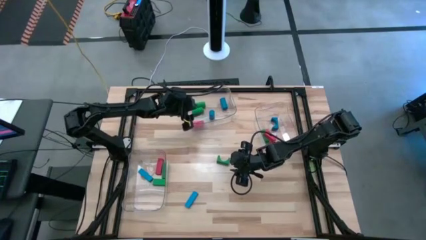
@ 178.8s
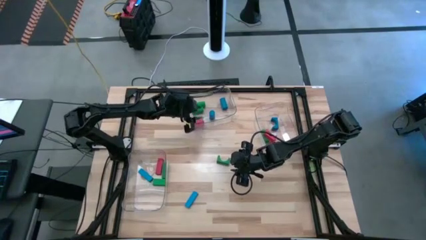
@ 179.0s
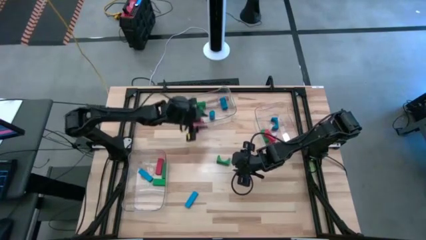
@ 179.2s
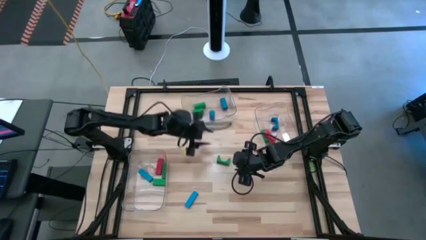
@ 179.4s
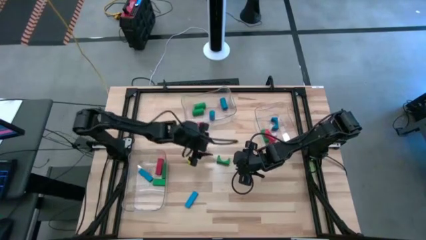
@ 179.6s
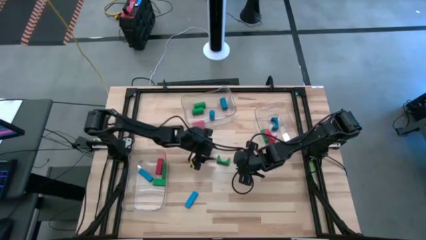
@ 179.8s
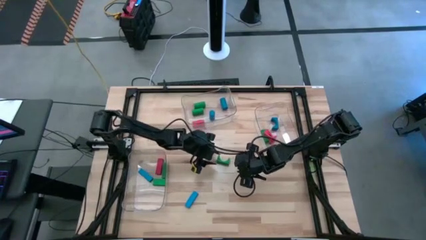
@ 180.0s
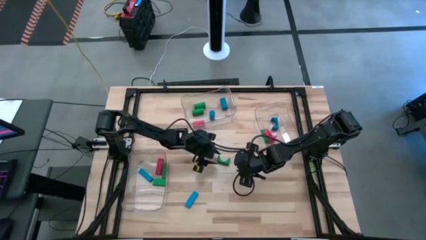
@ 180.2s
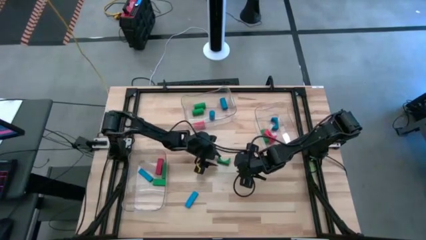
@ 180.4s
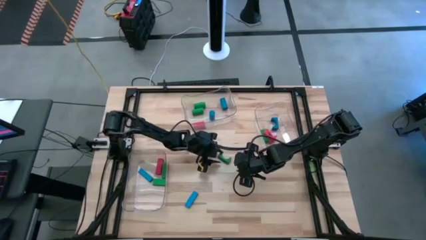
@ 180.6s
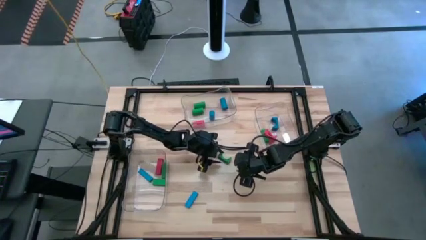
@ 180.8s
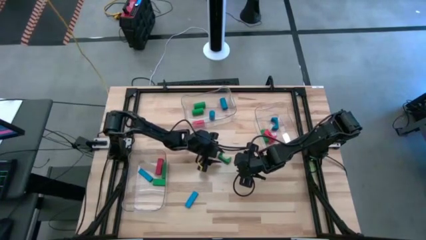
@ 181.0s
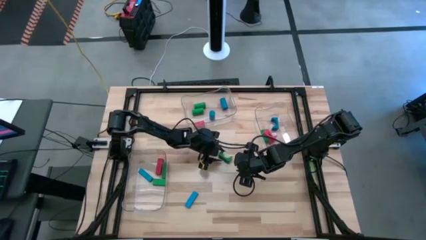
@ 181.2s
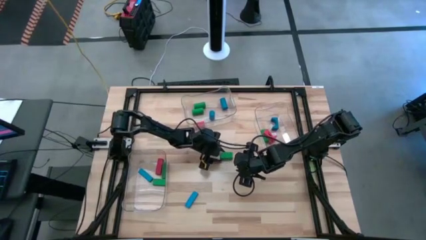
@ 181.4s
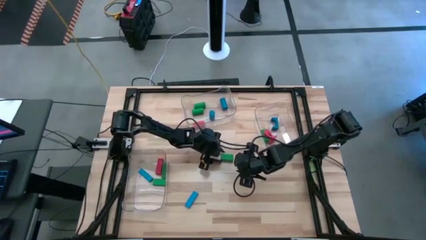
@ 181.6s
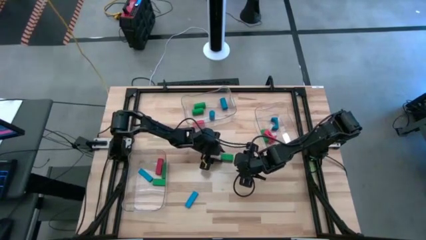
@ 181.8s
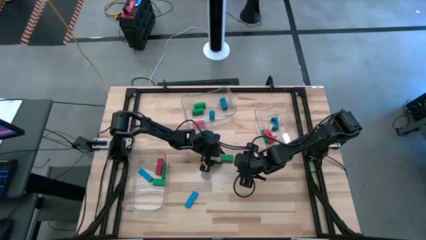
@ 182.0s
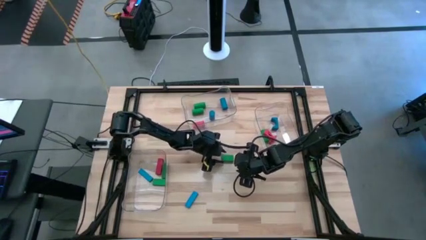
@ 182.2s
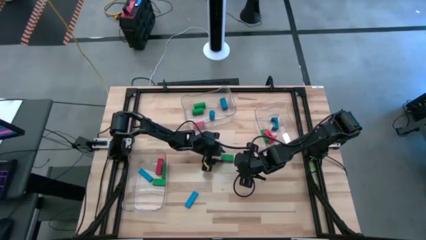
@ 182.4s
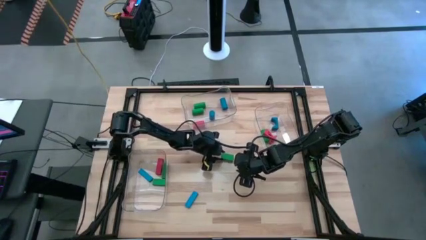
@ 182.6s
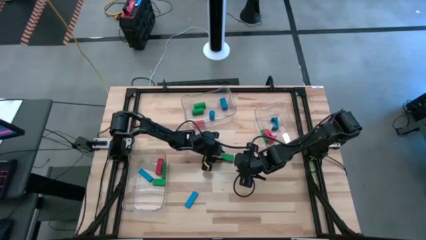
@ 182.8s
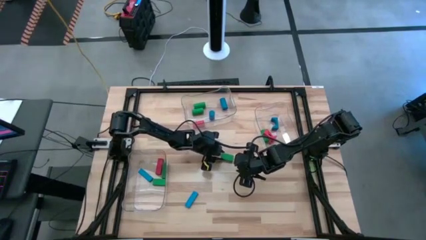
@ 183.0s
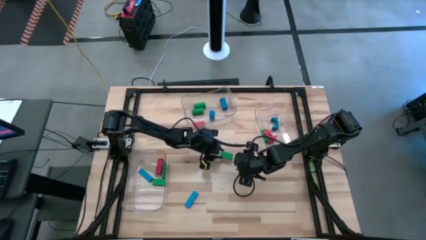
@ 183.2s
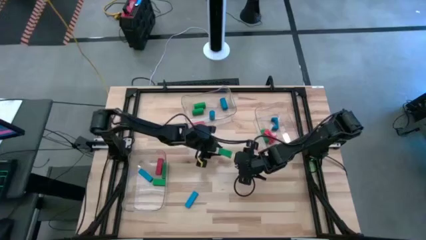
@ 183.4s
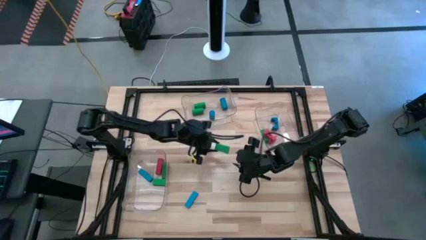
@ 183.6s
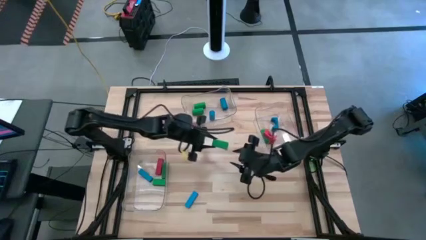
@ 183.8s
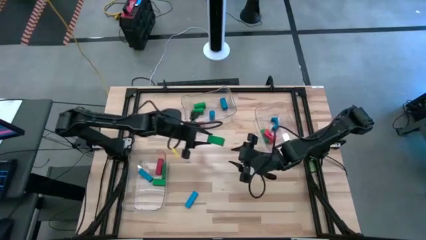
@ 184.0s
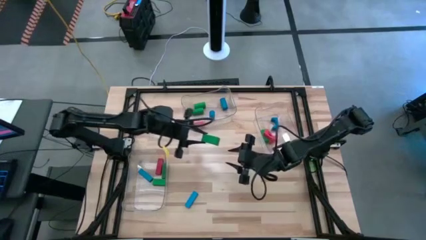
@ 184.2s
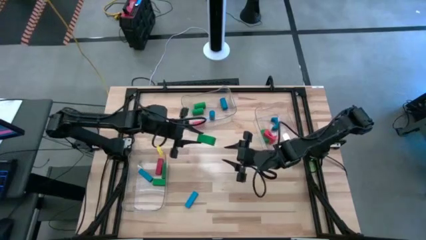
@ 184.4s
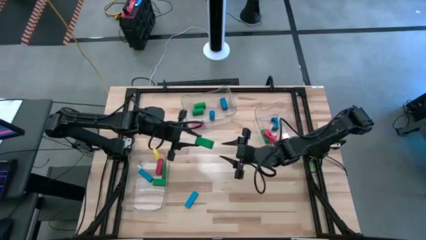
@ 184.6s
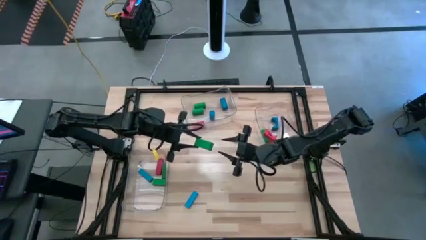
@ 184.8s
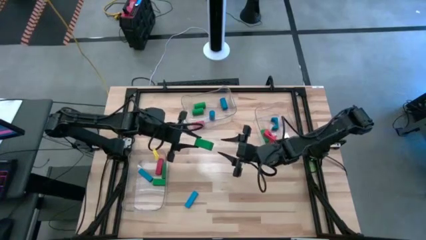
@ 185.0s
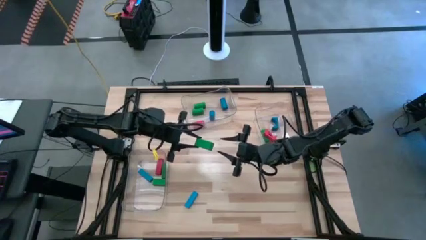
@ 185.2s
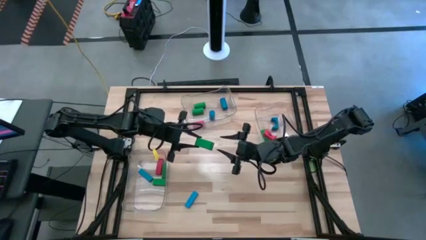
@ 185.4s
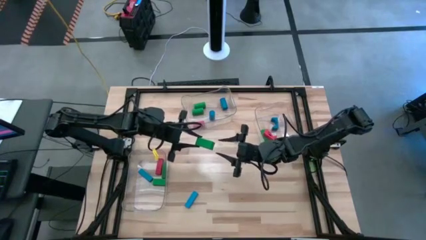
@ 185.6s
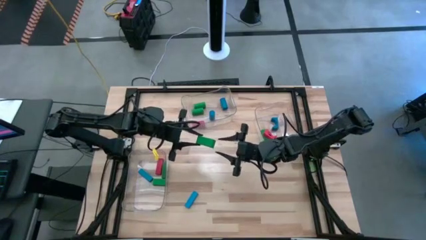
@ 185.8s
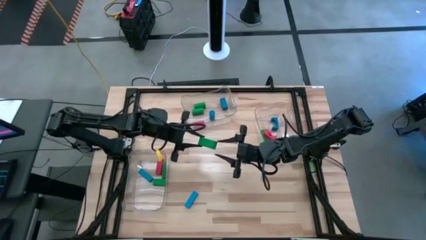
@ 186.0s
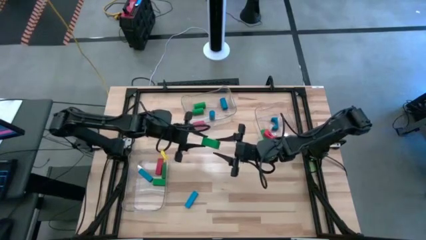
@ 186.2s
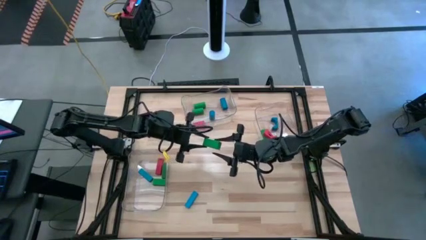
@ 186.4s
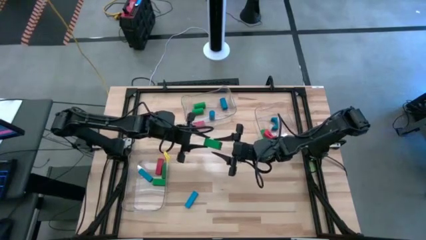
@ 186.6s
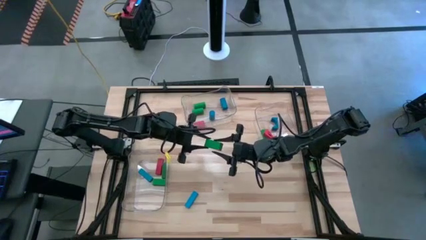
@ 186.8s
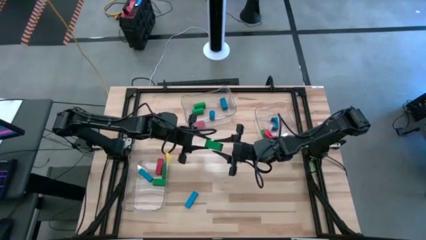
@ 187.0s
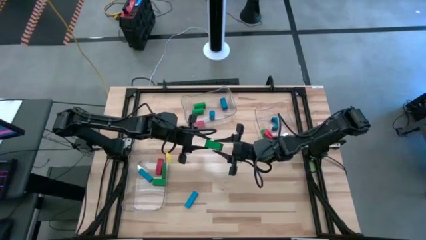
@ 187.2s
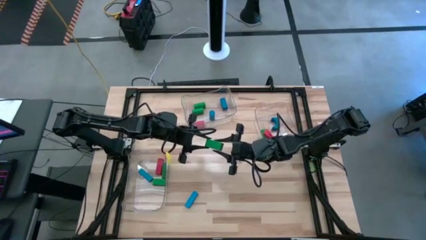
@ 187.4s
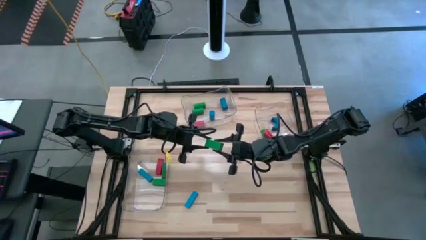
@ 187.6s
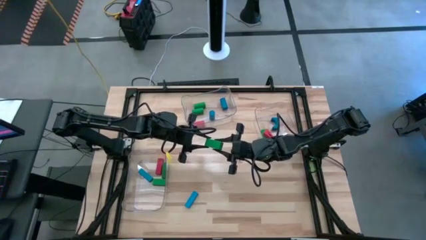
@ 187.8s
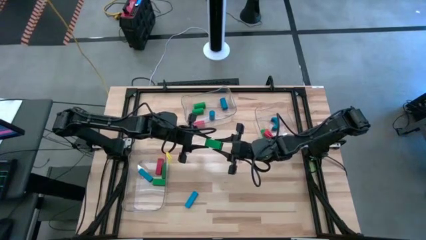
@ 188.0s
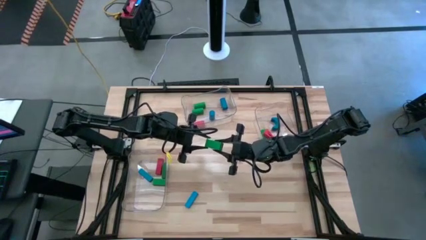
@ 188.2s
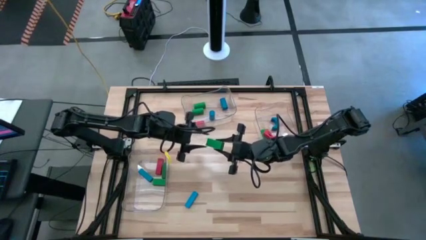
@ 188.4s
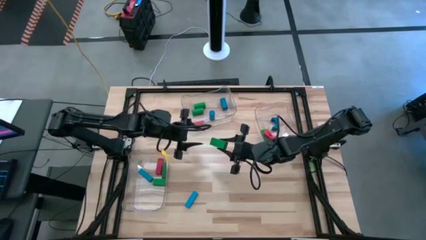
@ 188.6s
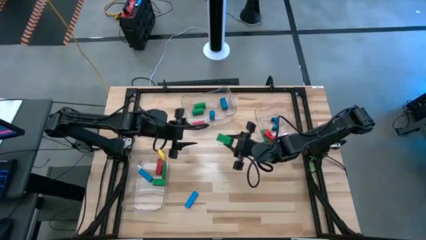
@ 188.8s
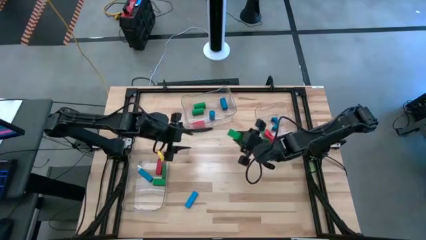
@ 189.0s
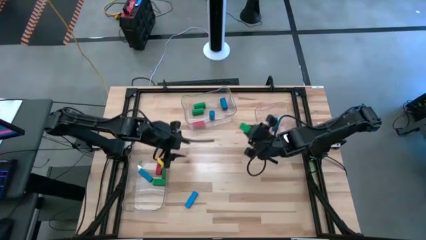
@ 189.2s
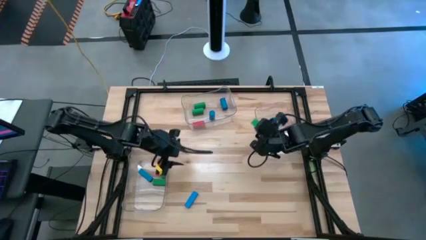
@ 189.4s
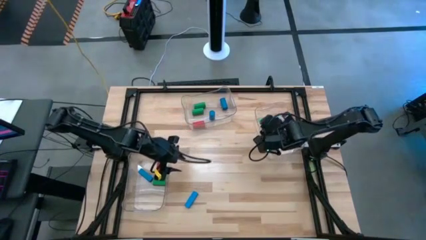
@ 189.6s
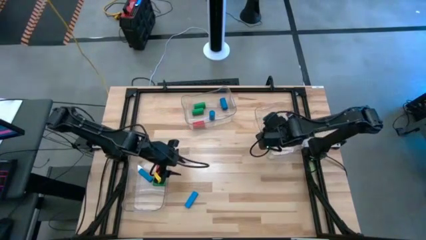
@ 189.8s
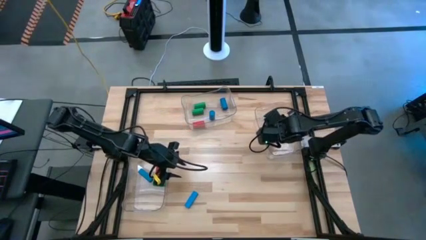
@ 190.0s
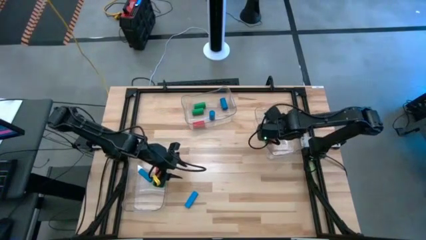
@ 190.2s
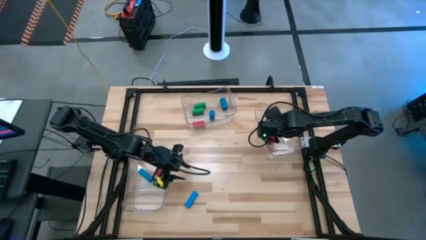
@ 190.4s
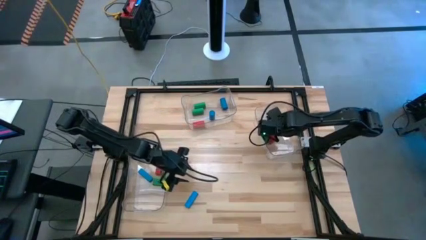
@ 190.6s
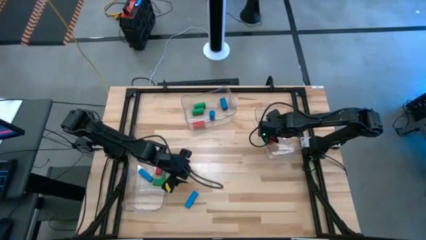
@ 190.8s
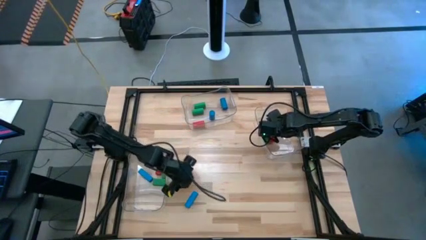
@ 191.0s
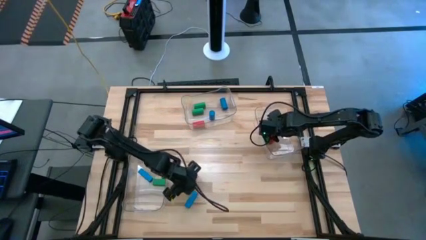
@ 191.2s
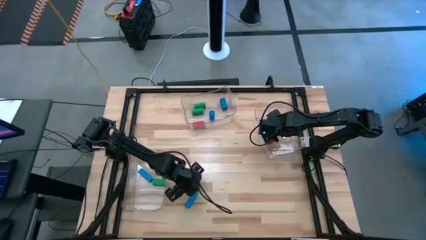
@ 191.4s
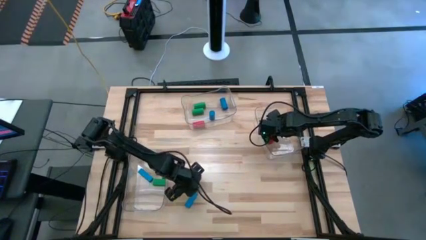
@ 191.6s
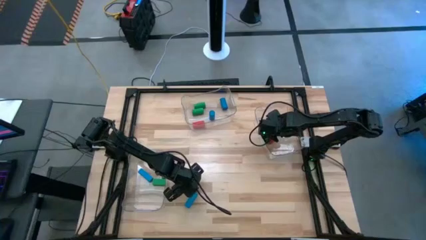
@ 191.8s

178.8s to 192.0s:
Task: Sort blocks by size
Put the green arch block into the left transparent bin

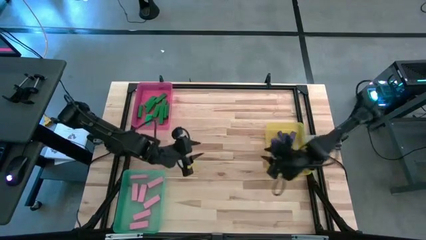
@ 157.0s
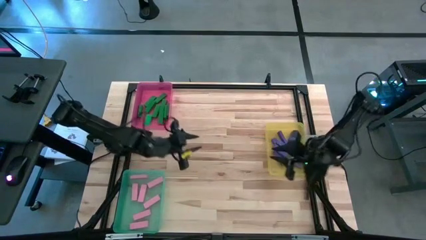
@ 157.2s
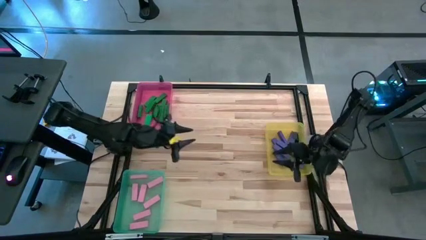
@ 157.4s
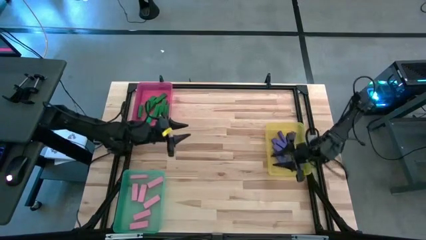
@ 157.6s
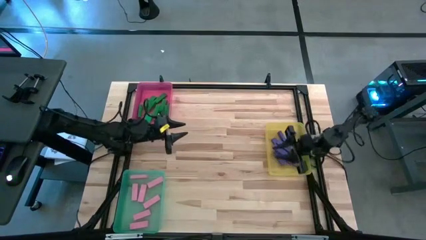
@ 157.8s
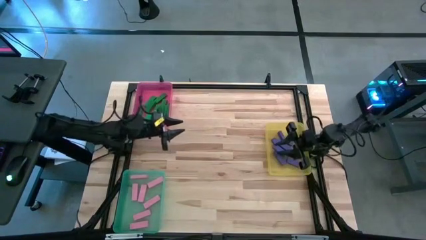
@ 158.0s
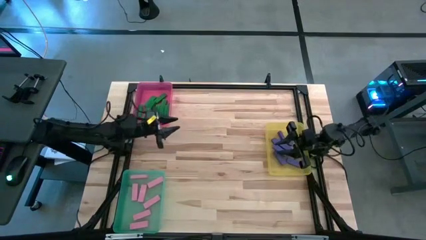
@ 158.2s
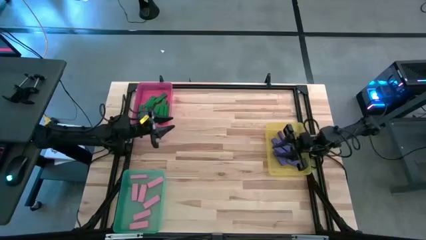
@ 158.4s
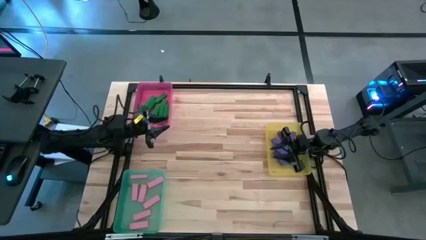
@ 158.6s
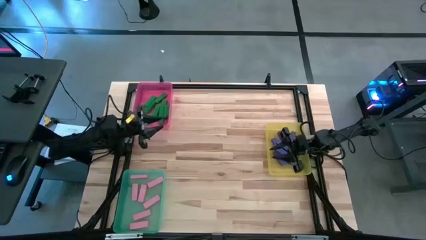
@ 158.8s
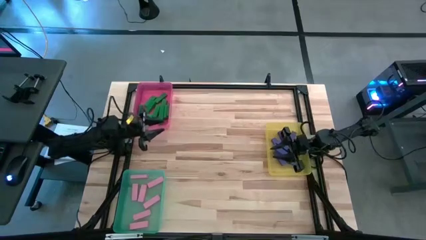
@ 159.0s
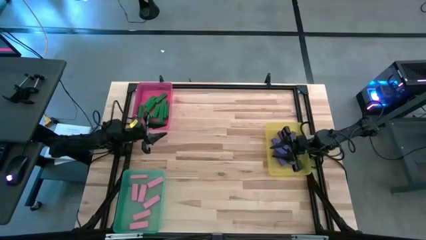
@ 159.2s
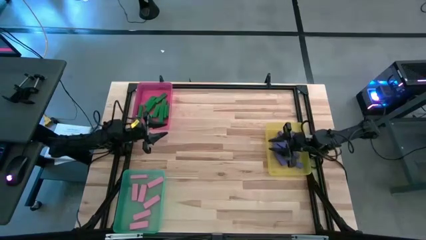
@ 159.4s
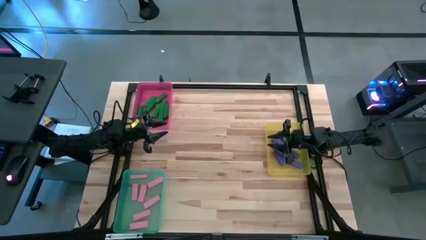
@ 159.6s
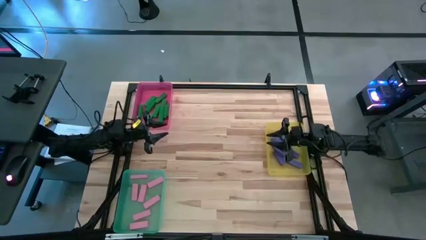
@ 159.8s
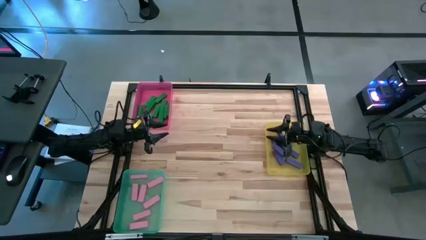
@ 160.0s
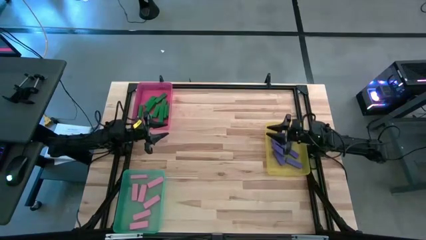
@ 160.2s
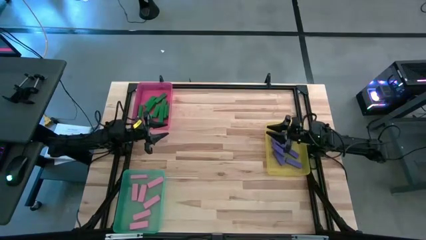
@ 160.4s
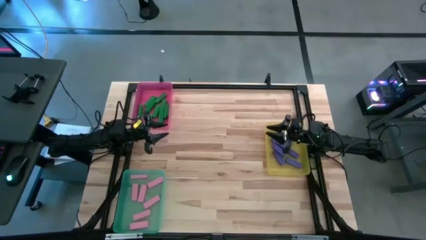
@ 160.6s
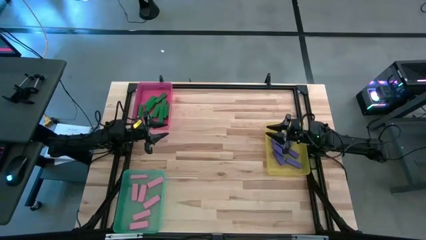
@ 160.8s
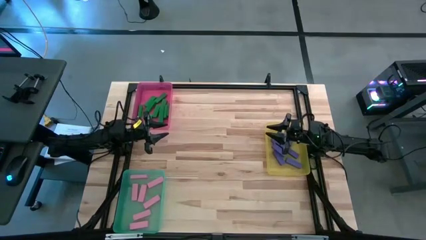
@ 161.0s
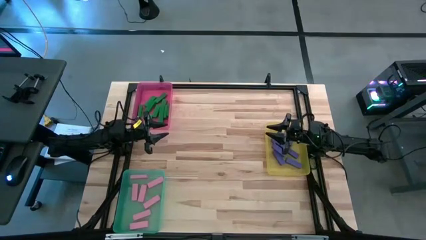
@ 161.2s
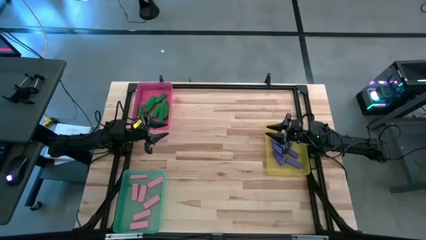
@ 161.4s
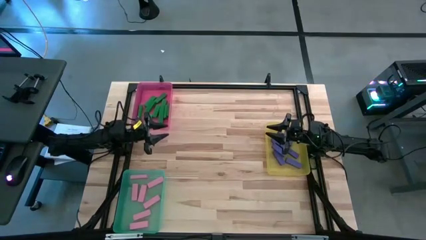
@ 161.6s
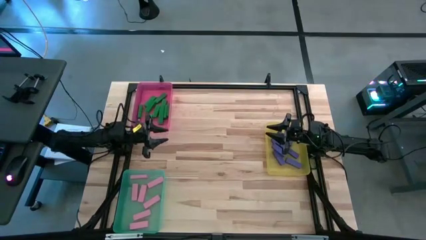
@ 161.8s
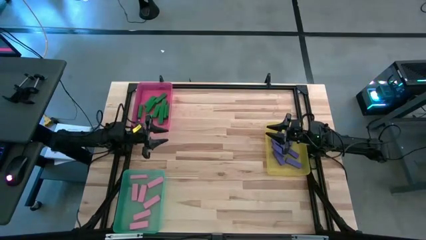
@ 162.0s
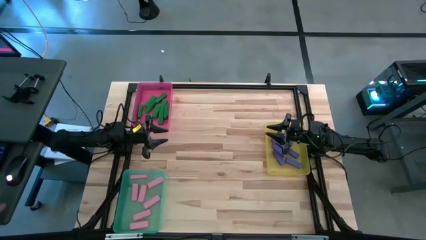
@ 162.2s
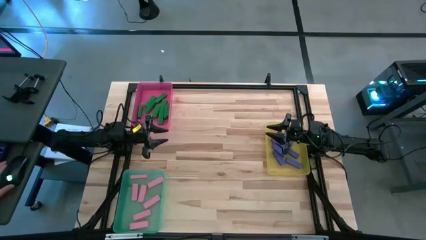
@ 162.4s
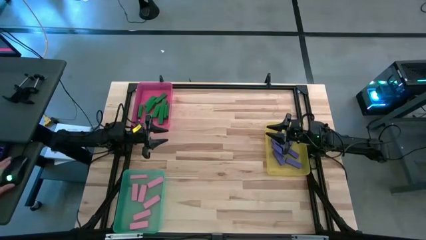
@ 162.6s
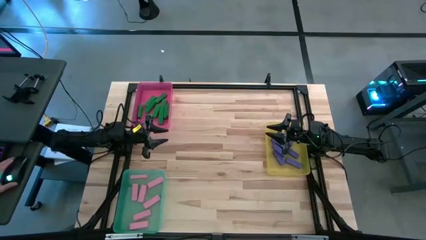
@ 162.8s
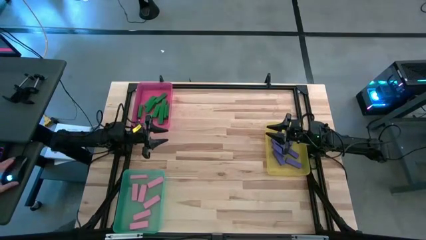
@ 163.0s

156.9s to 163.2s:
Task: Sort blocks
Return to Home Position
